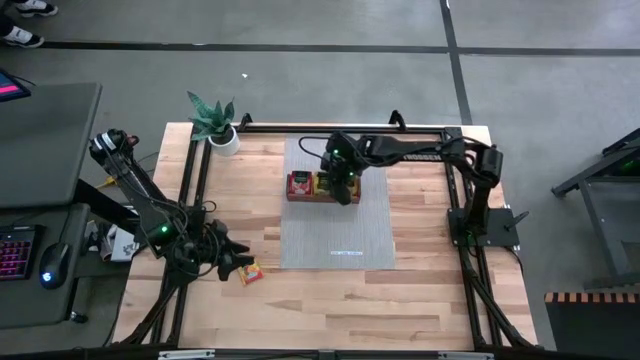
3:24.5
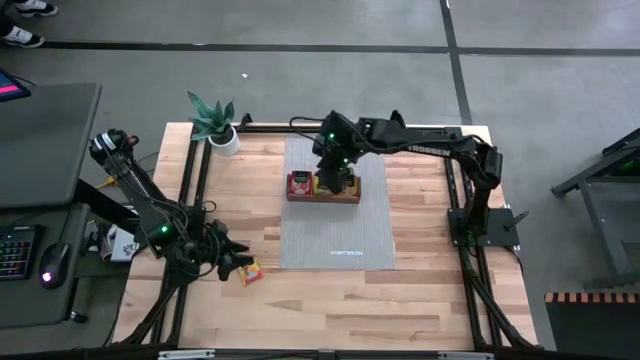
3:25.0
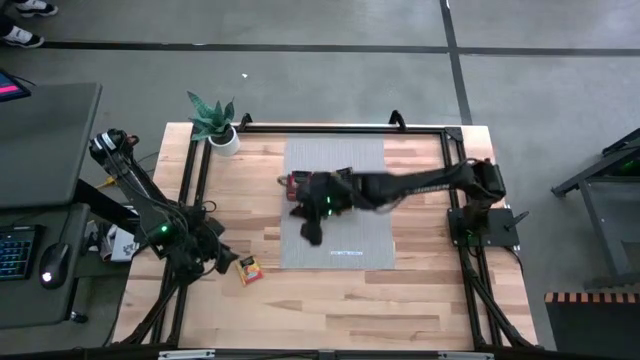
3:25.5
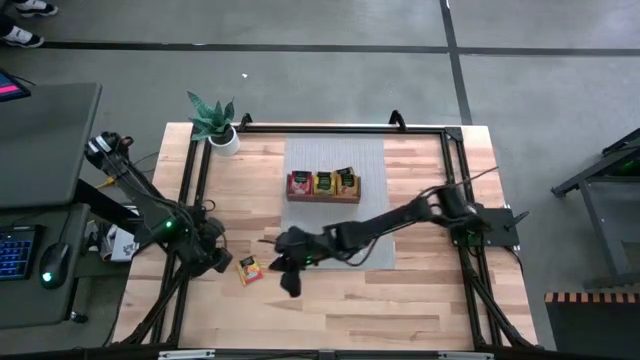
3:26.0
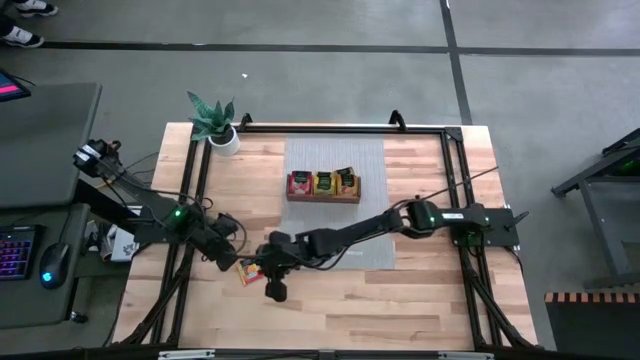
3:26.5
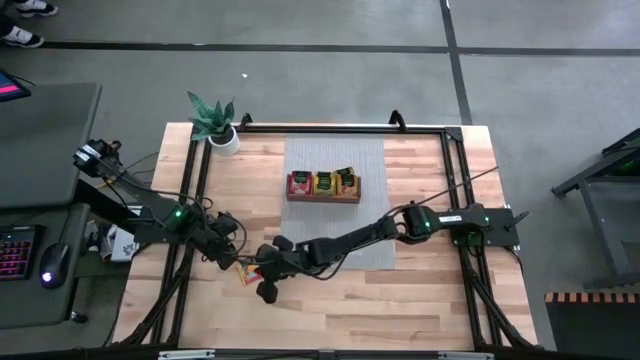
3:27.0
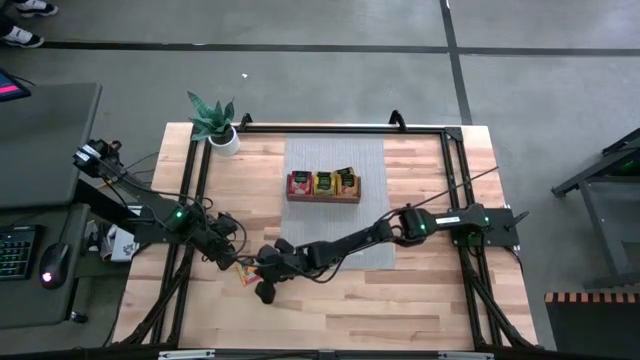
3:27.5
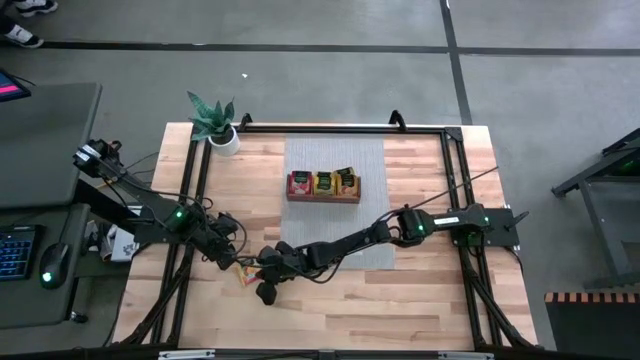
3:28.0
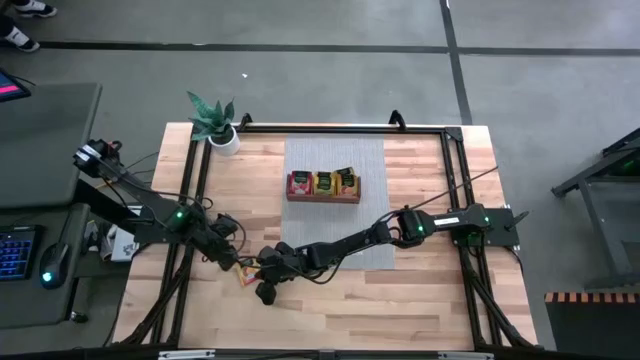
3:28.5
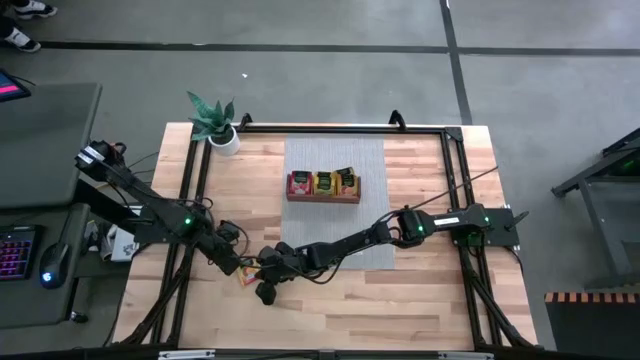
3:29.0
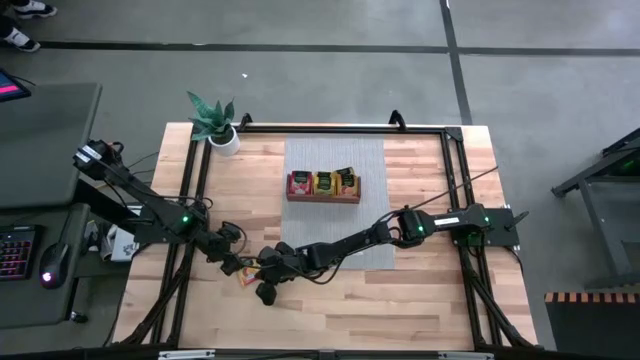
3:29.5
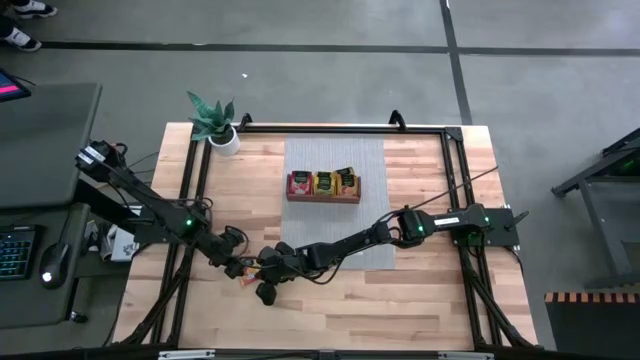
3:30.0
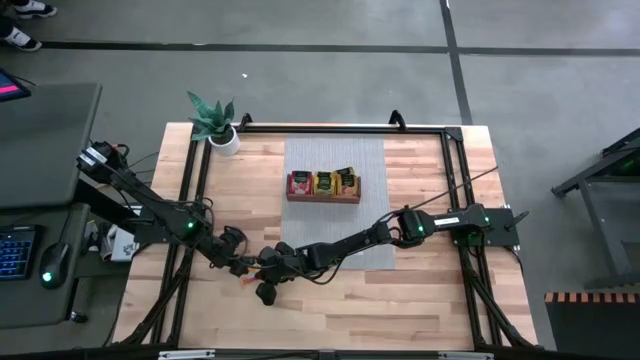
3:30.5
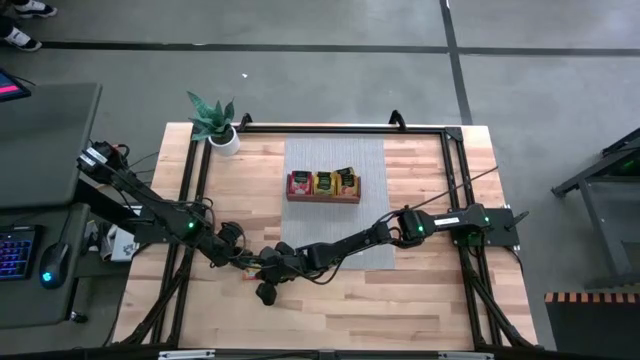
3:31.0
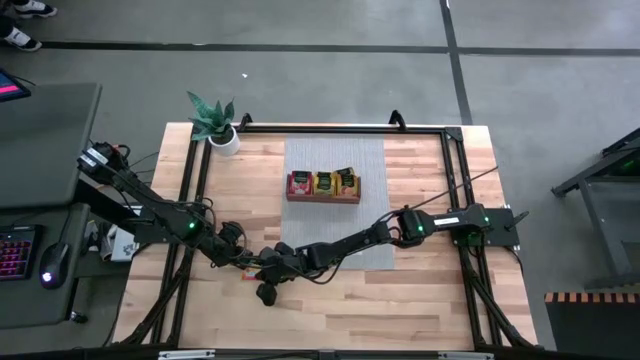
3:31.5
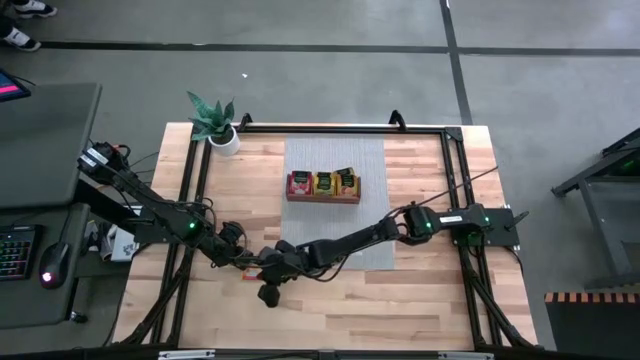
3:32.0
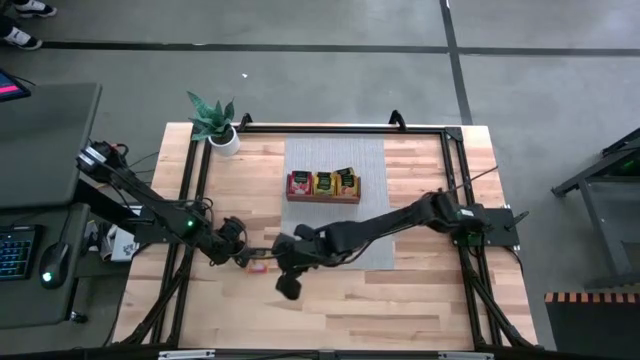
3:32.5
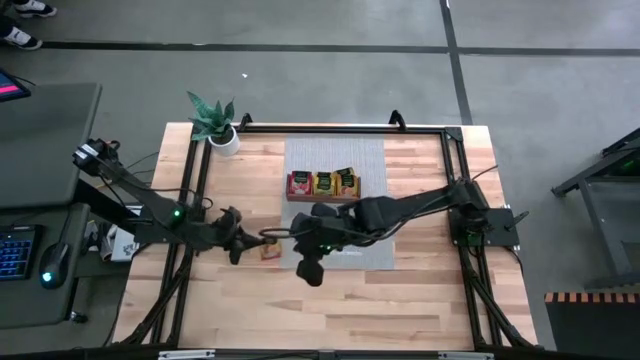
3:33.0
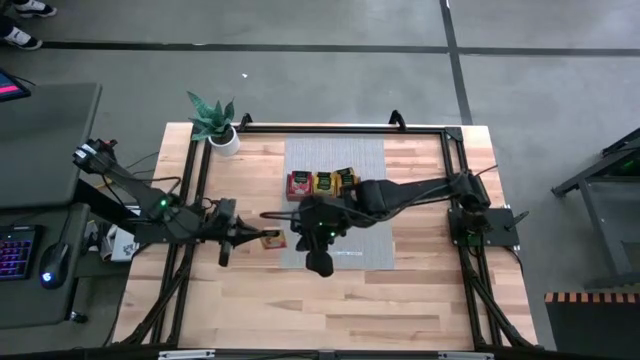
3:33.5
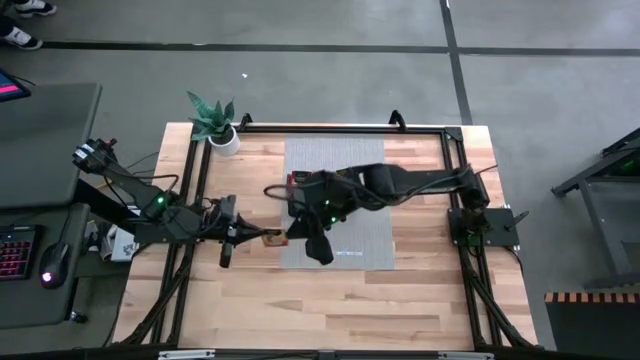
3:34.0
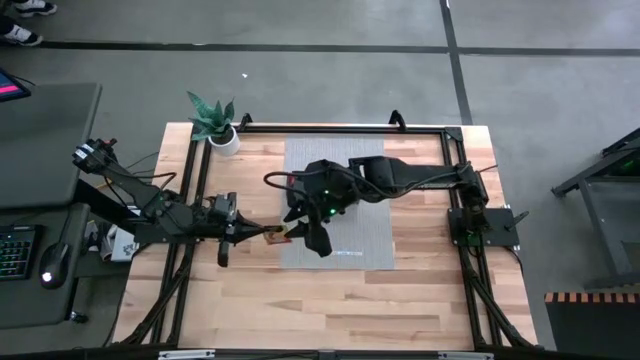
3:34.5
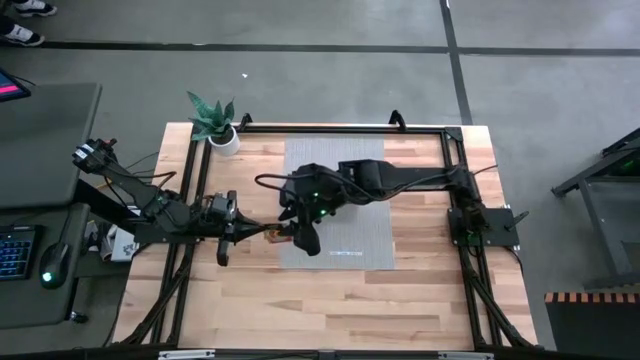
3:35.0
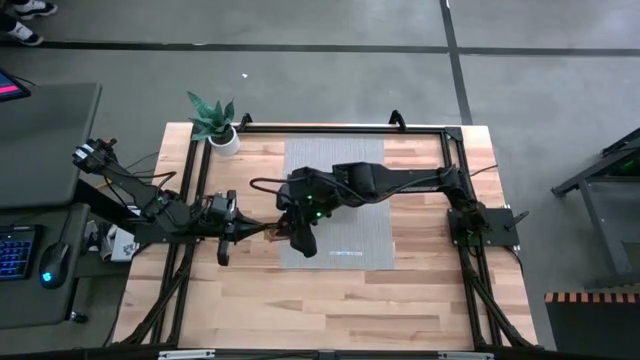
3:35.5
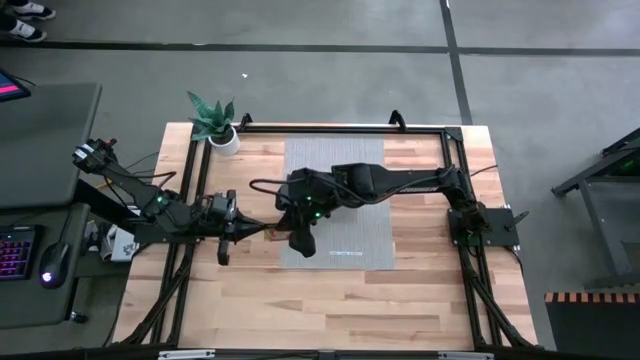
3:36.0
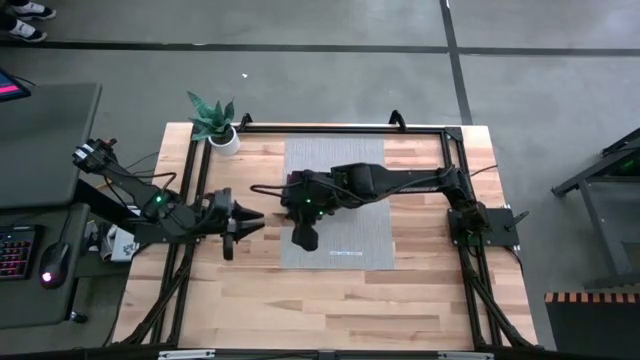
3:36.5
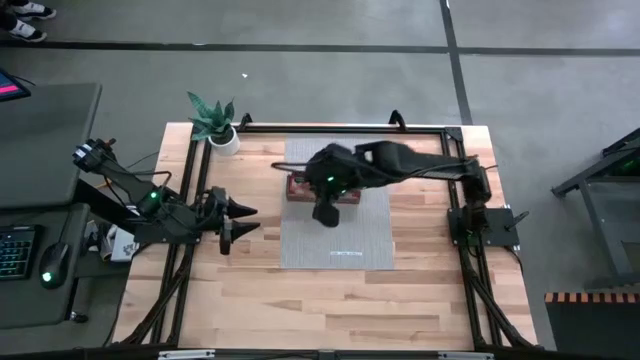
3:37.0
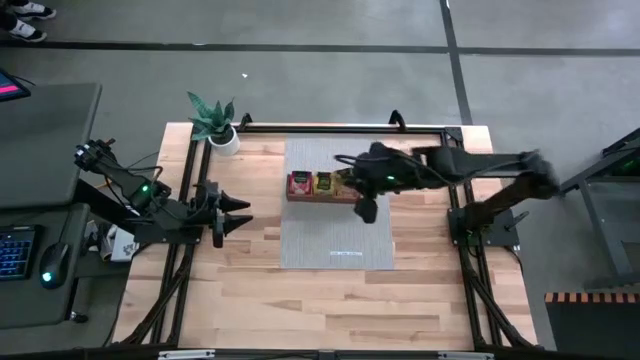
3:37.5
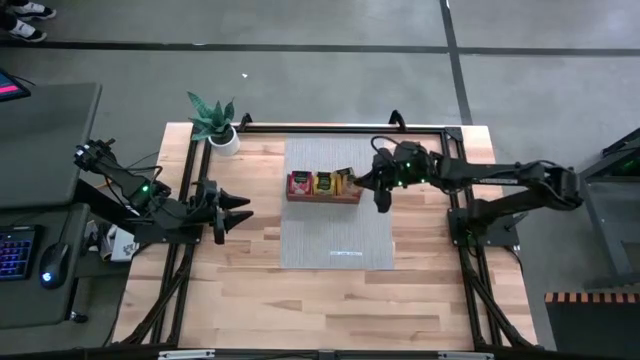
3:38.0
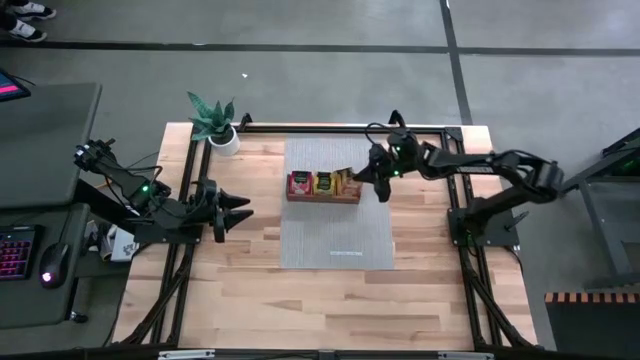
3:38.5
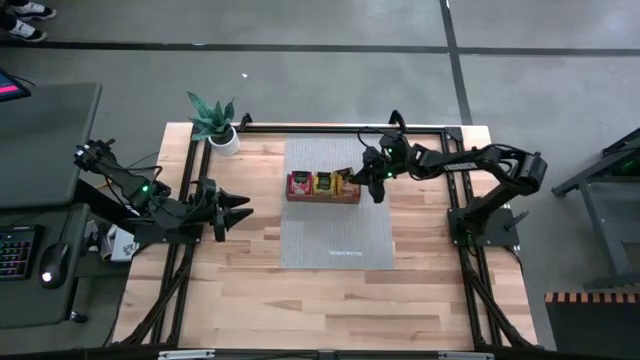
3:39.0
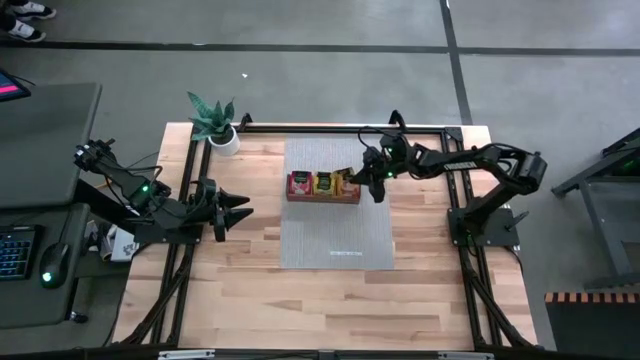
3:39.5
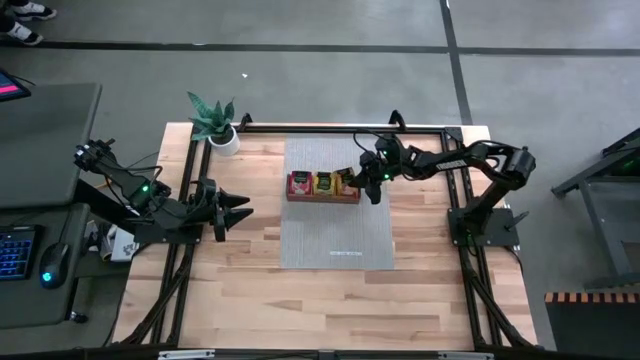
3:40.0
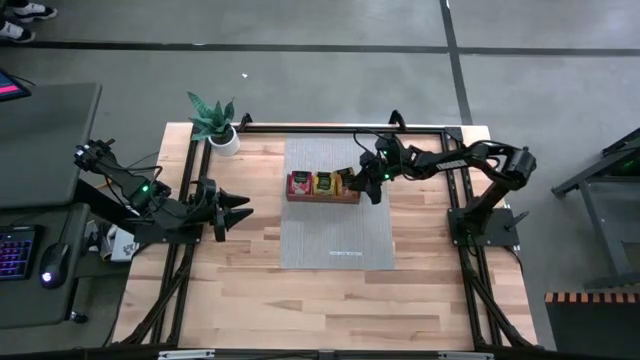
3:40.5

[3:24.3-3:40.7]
Task: Pick & Place Tea
Put the orange tea bag into the right section of the wooden organizer

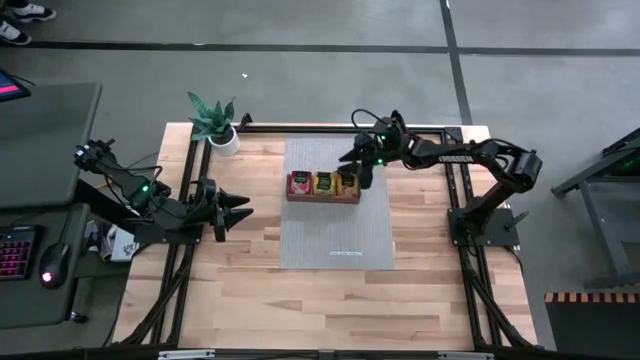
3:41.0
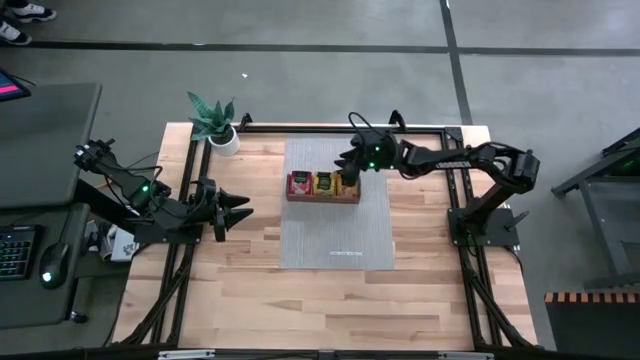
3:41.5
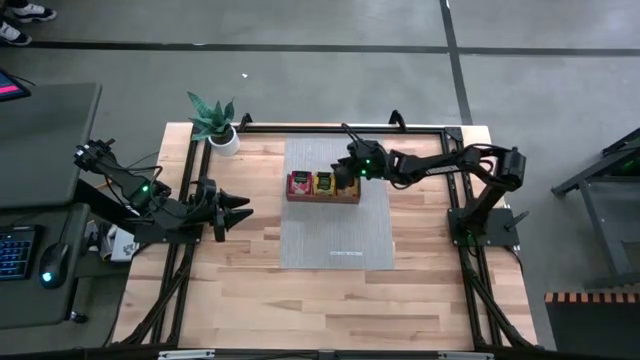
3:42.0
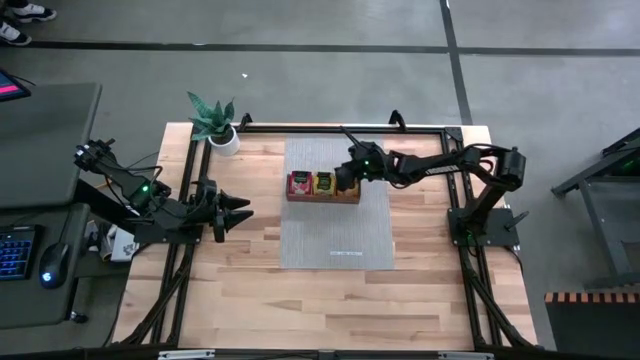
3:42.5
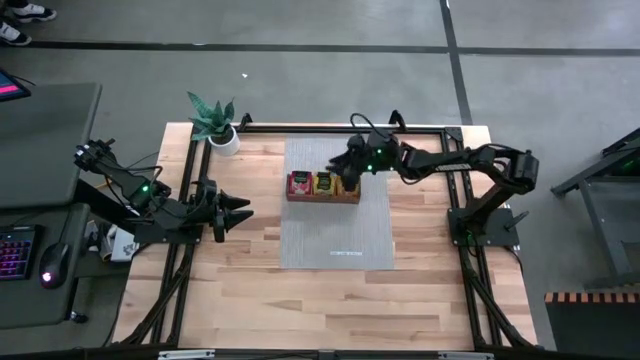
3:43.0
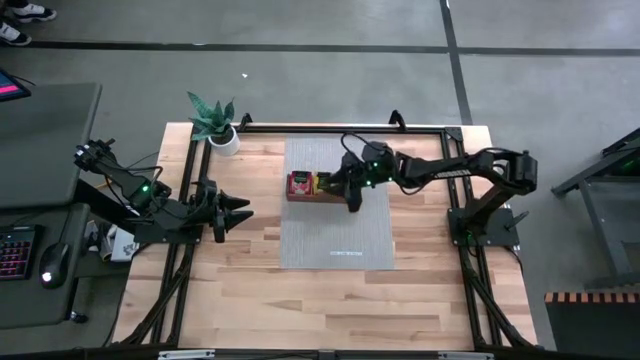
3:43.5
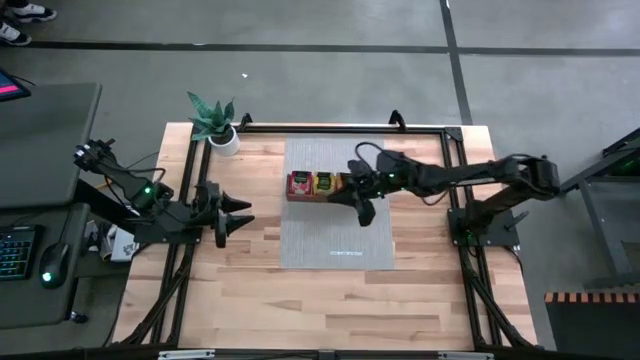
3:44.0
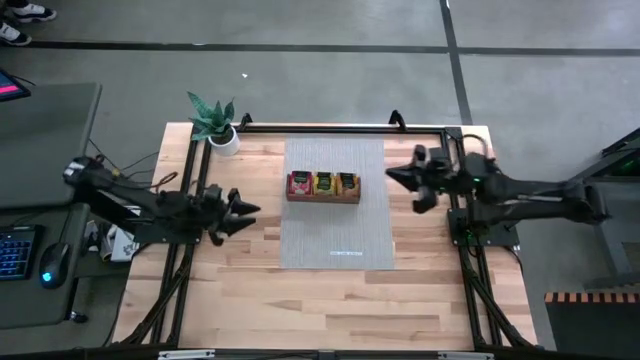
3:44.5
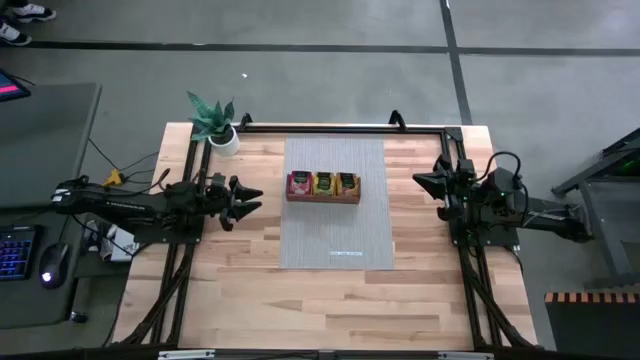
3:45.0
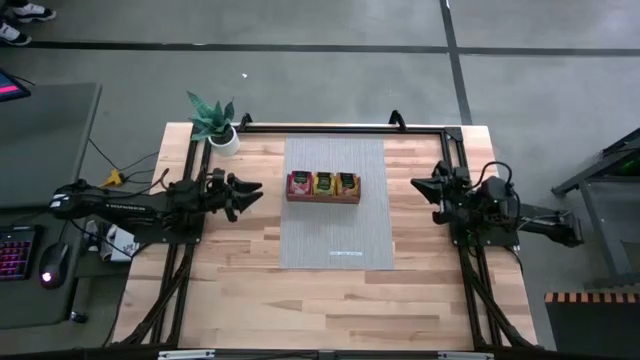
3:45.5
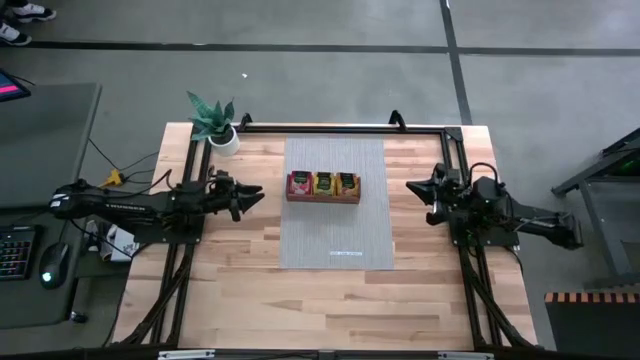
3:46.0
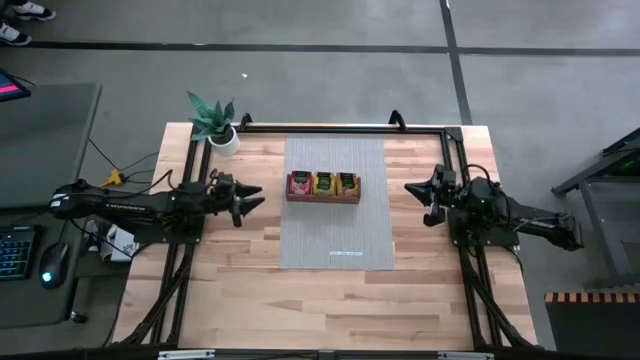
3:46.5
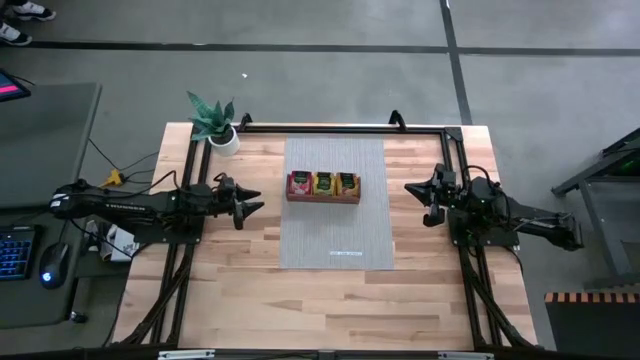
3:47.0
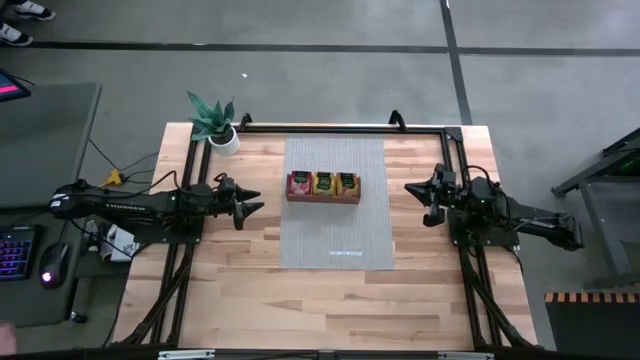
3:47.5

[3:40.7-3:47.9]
Return to Home Position
